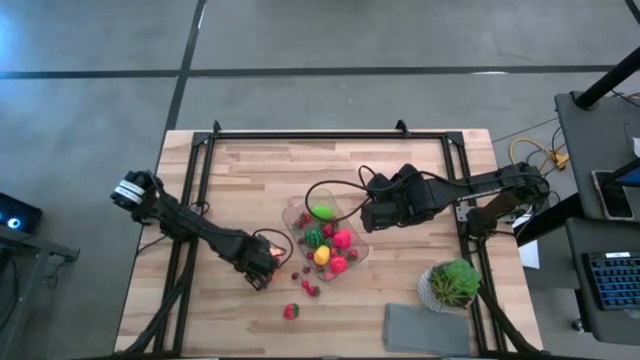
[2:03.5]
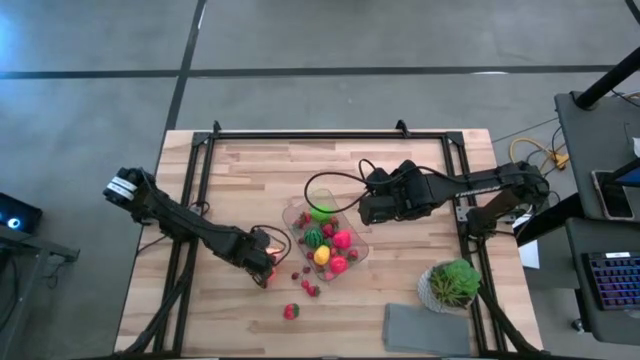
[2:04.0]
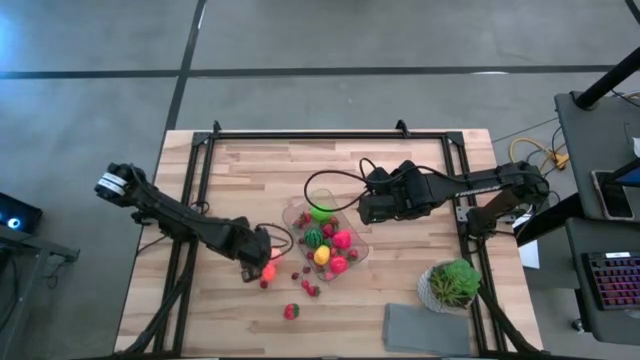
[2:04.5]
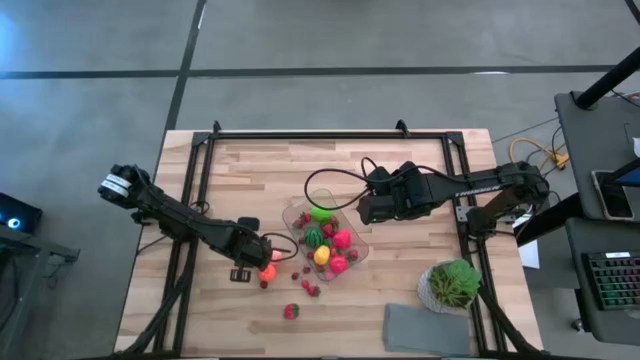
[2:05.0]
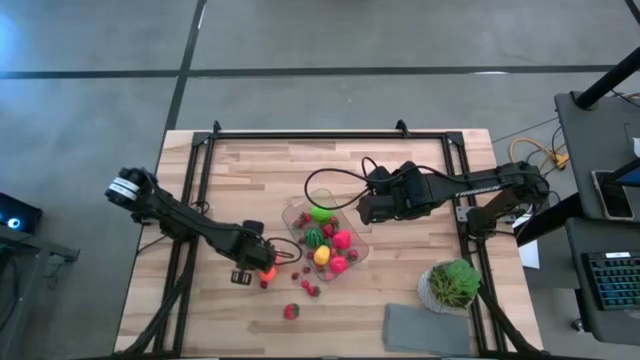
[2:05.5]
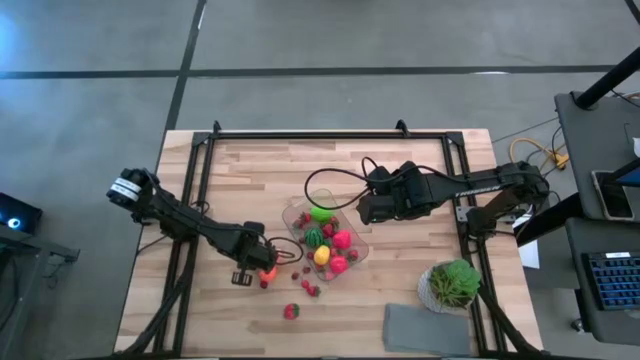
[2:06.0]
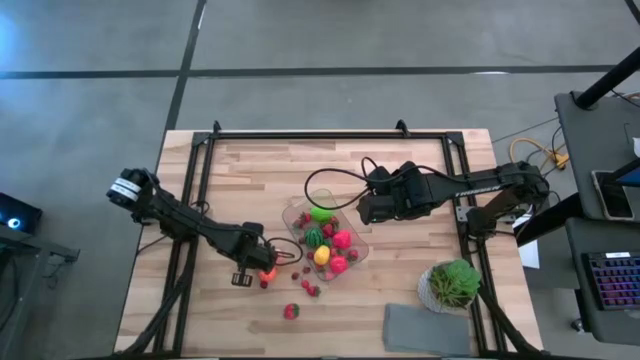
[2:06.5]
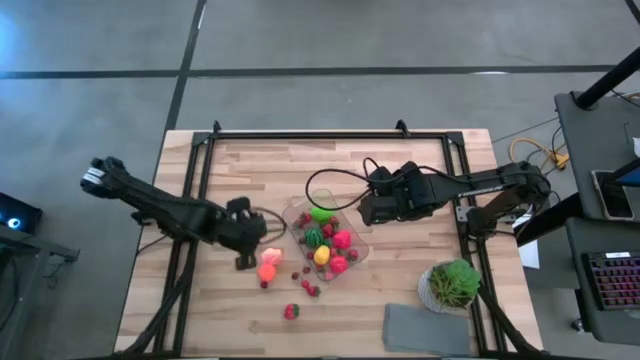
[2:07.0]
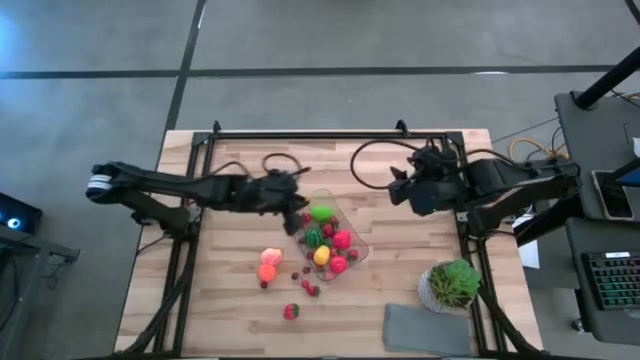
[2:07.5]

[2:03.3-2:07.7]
Task: Pick and placing Produce into tupperware
Put the yellow corn into the transparent bin

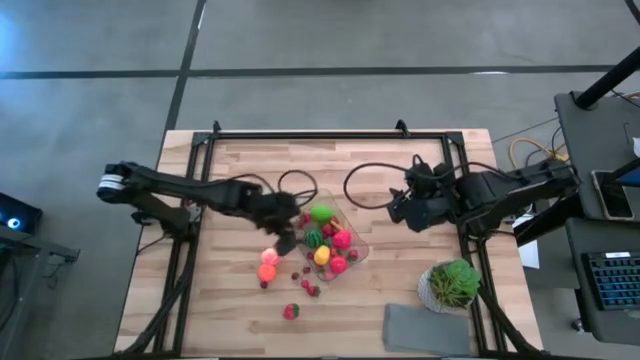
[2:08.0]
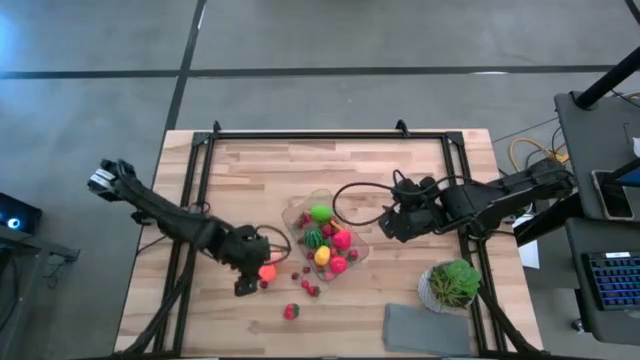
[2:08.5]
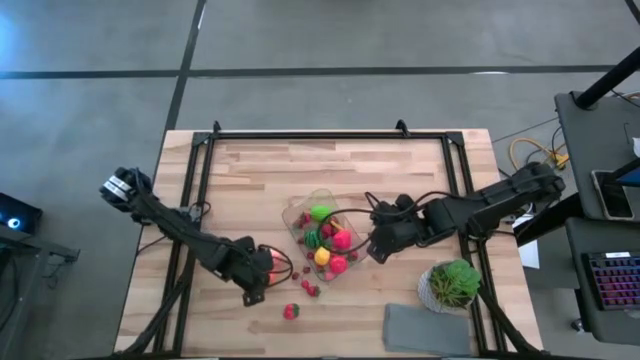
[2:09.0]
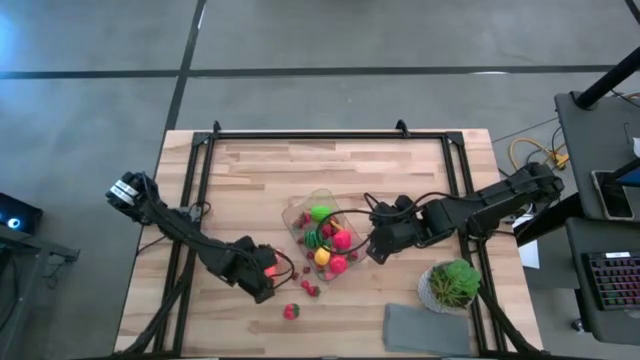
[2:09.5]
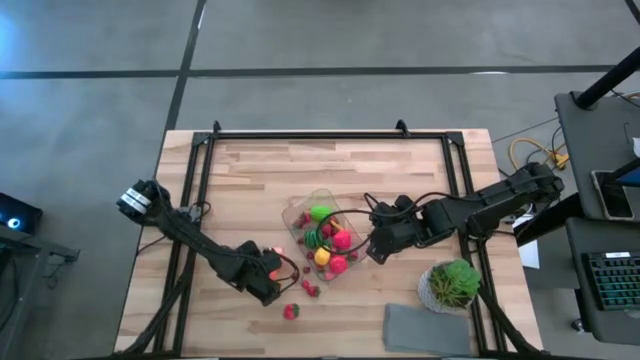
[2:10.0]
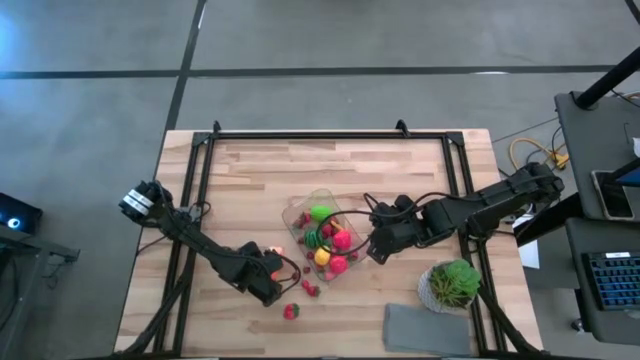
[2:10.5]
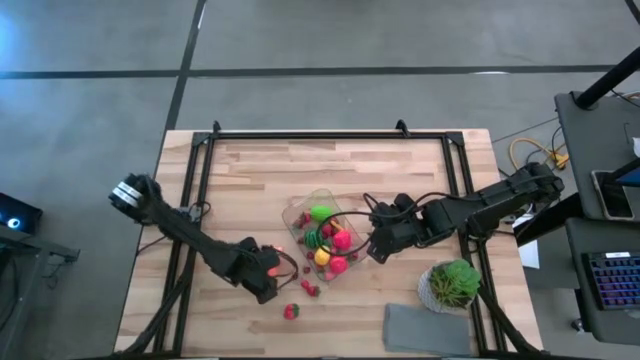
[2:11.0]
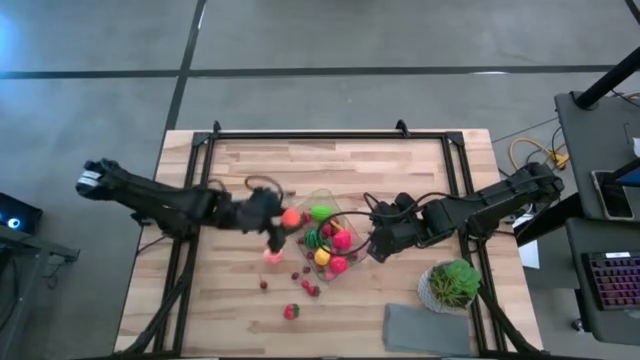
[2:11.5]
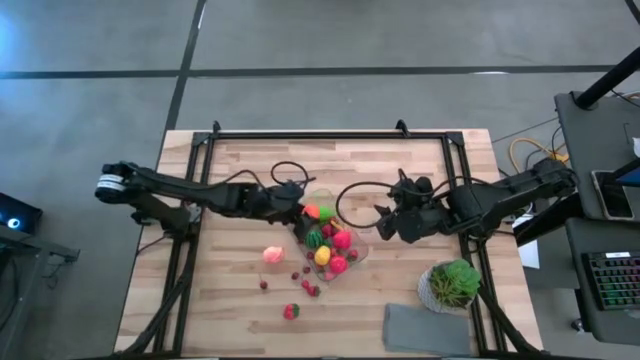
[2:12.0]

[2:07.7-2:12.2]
Put the orange pumpkin into the transparent bin

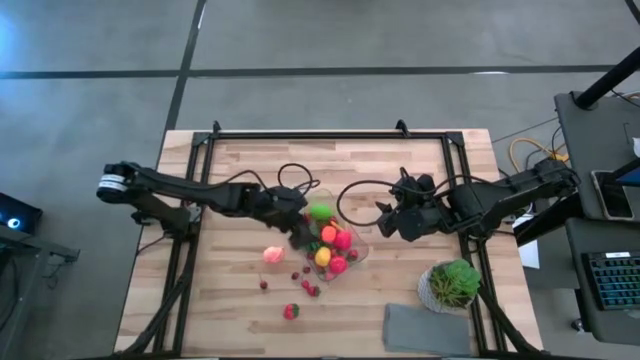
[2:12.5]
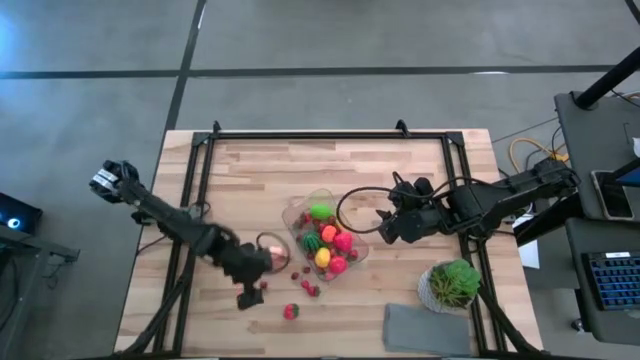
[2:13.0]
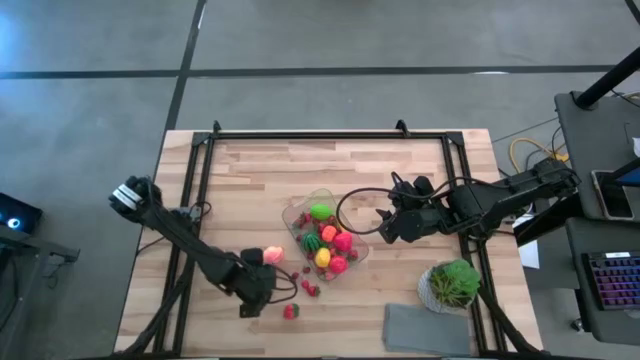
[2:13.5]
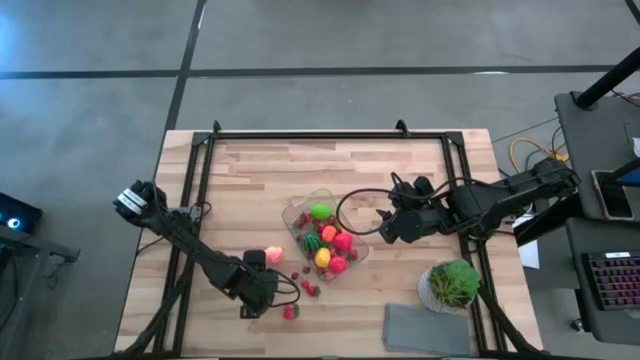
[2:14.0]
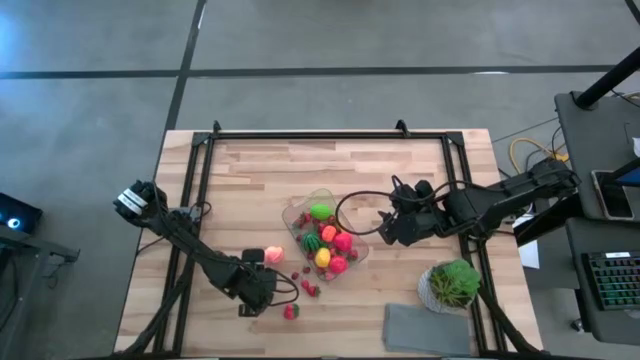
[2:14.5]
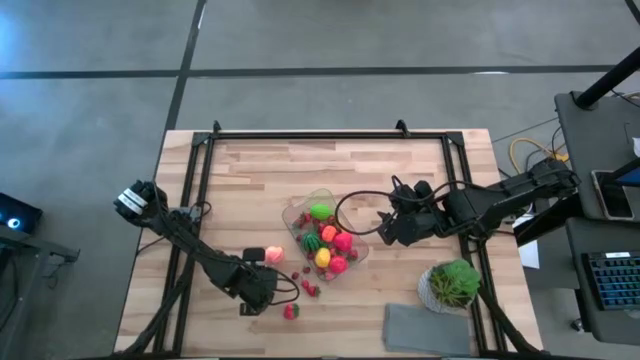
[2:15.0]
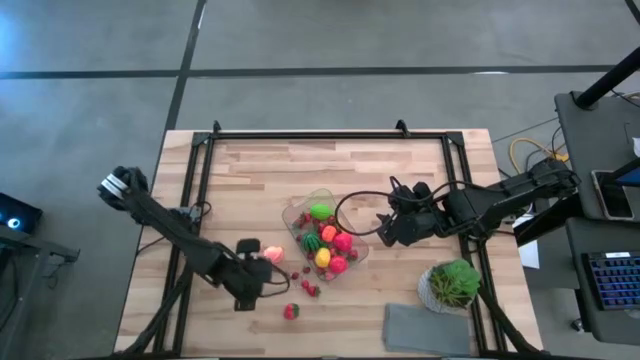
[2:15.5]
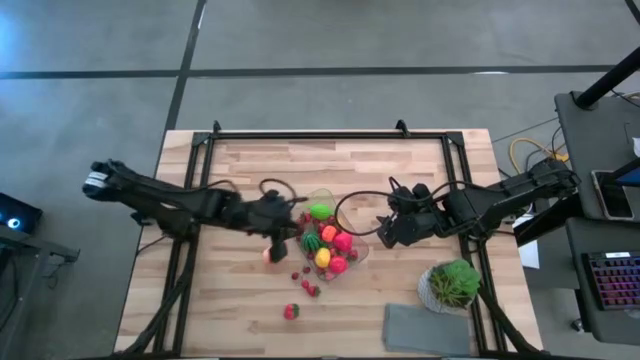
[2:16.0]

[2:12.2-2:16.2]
Put the red cherry into the transparent bin

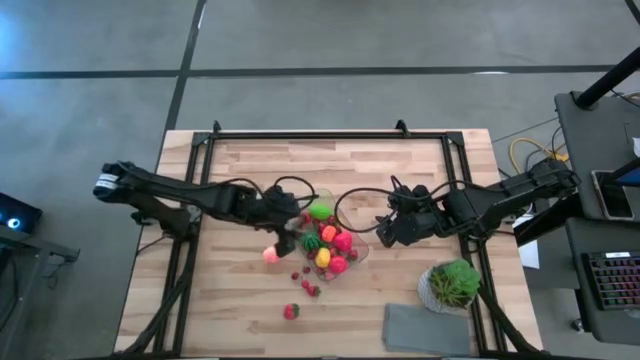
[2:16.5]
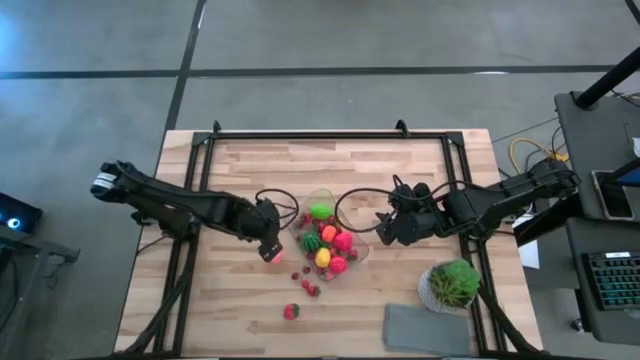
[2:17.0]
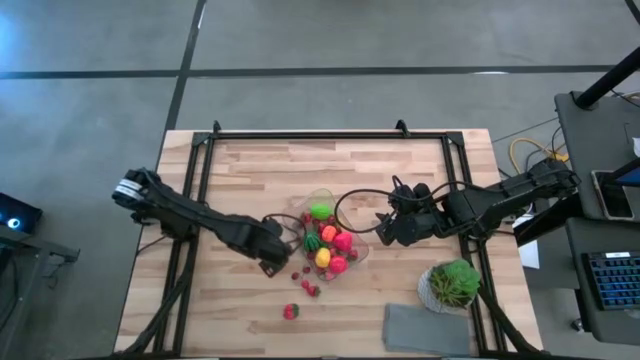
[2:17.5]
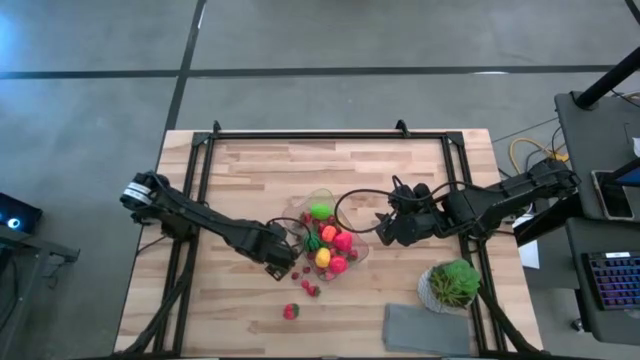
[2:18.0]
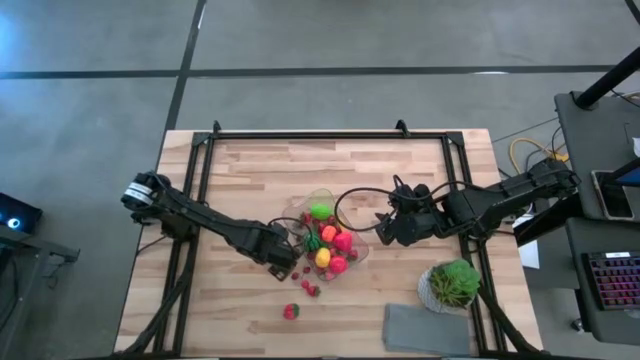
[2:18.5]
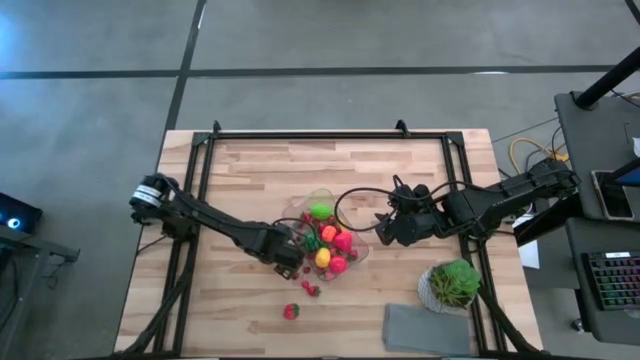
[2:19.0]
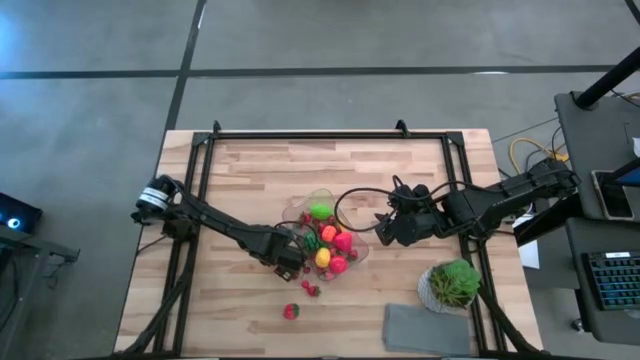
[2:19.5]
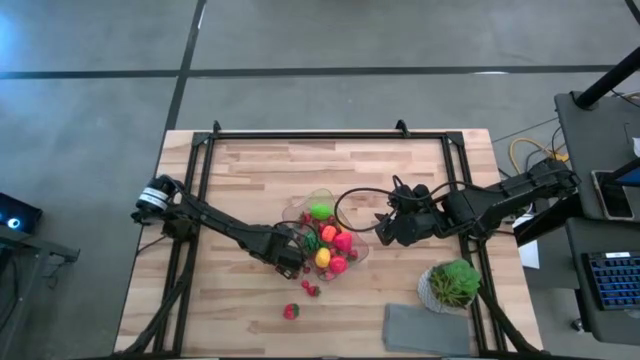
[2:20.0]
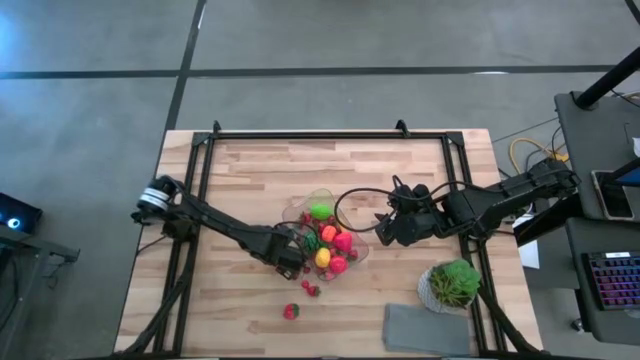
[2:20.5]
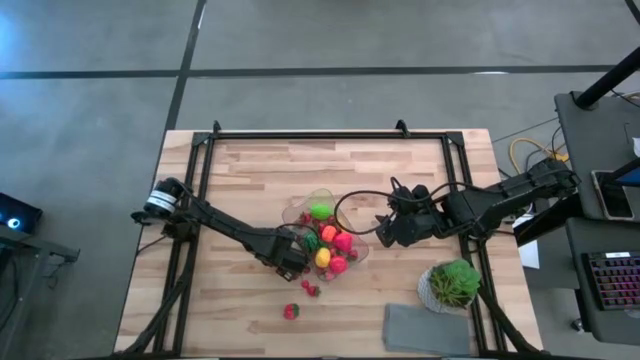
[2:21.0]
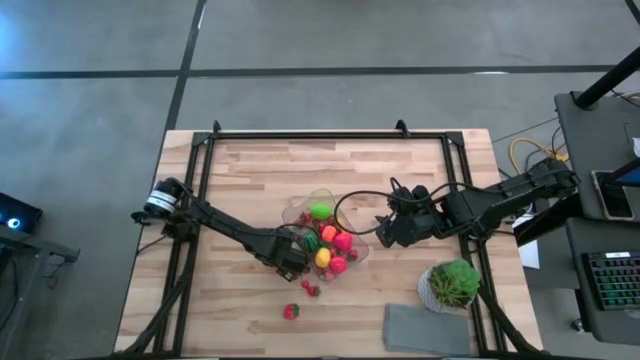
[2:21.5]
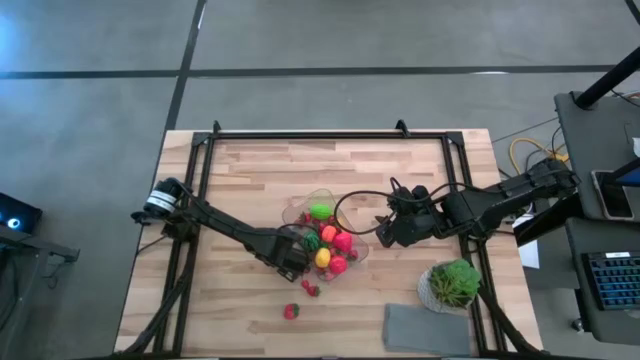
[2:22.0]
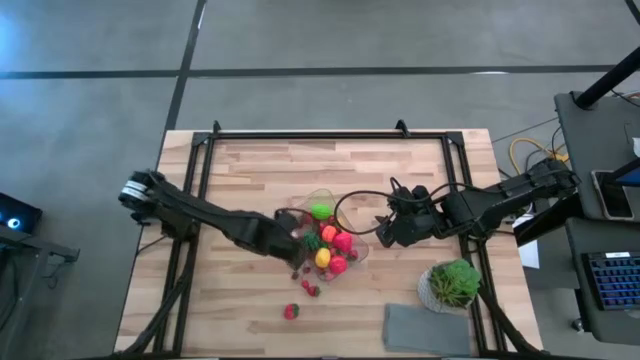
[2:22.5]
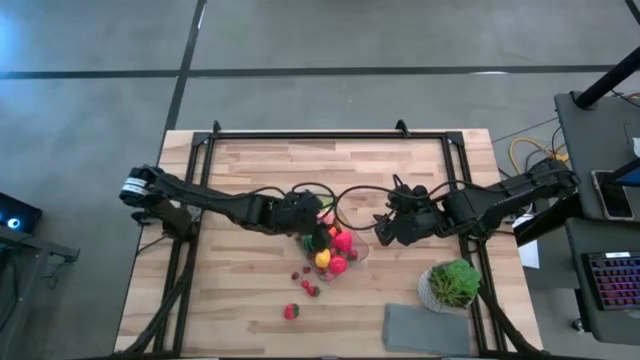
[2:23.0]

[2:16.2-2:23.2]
Put the pink peach into the transparent bin
